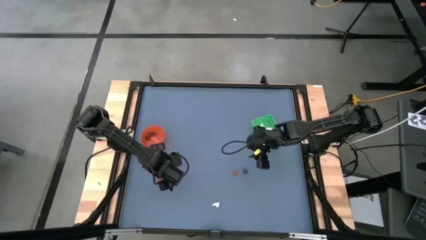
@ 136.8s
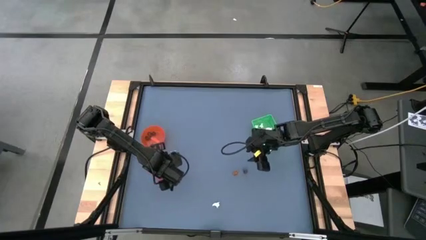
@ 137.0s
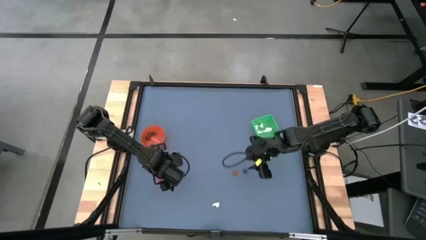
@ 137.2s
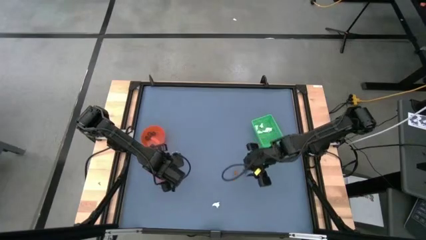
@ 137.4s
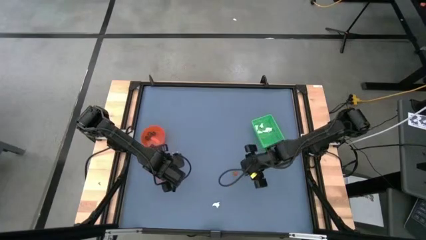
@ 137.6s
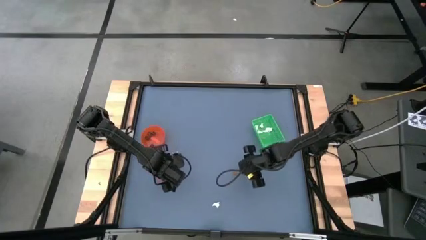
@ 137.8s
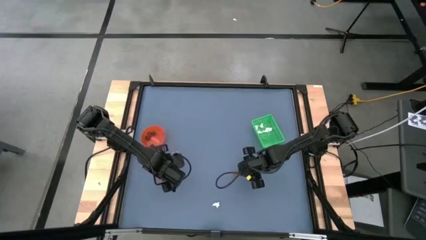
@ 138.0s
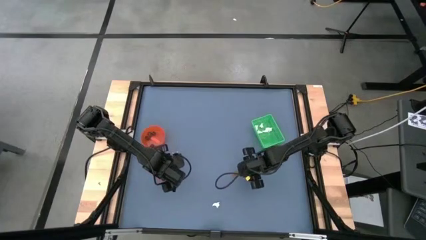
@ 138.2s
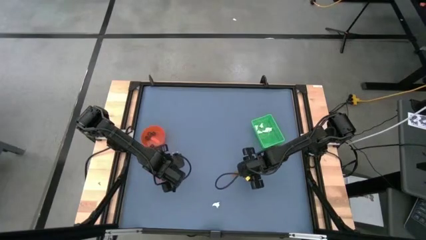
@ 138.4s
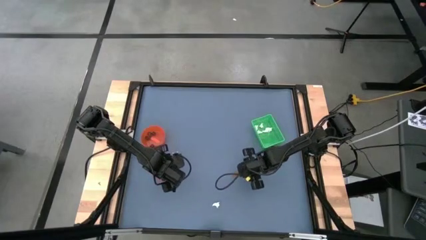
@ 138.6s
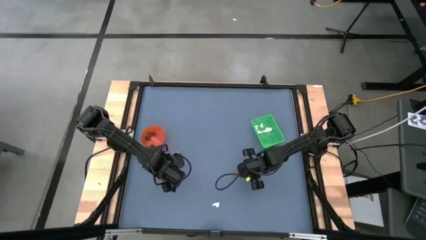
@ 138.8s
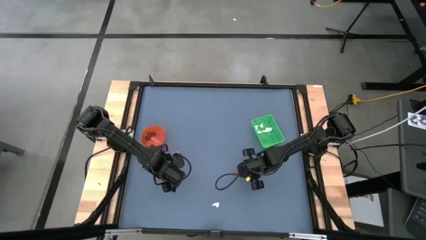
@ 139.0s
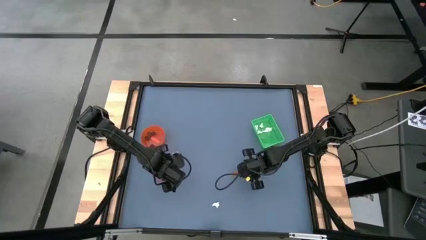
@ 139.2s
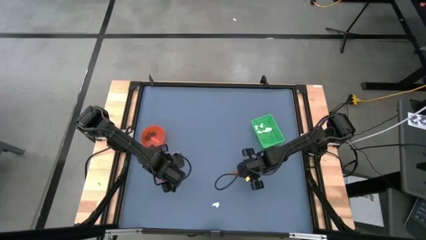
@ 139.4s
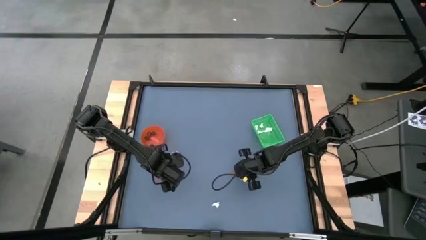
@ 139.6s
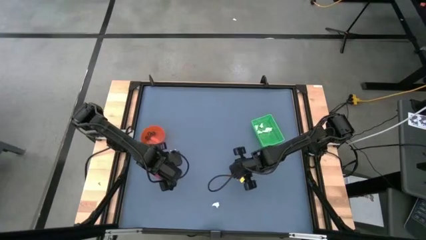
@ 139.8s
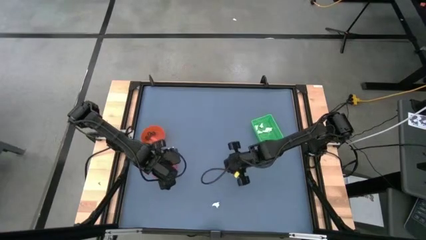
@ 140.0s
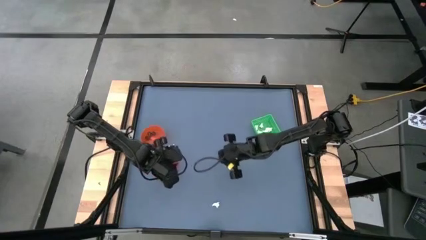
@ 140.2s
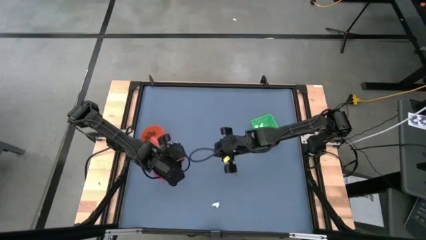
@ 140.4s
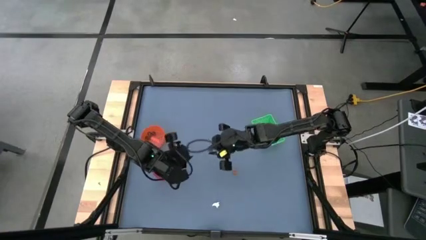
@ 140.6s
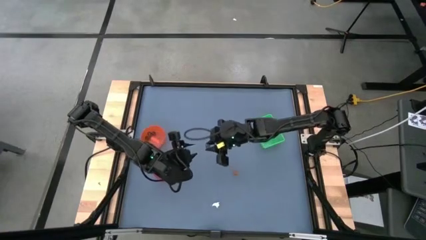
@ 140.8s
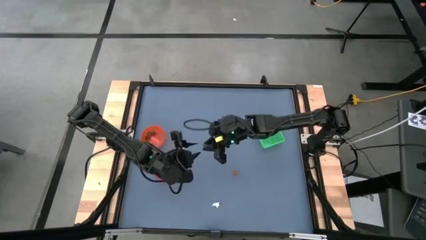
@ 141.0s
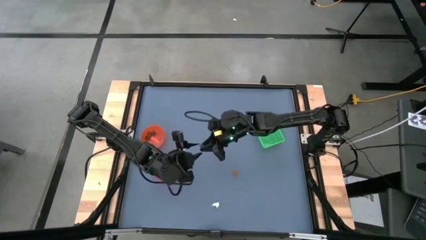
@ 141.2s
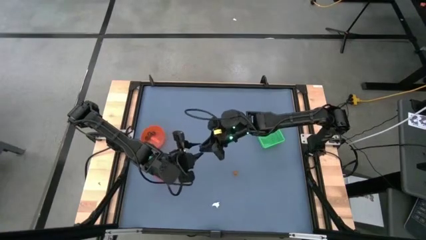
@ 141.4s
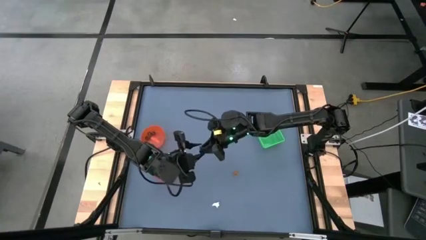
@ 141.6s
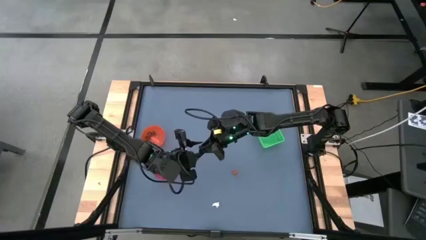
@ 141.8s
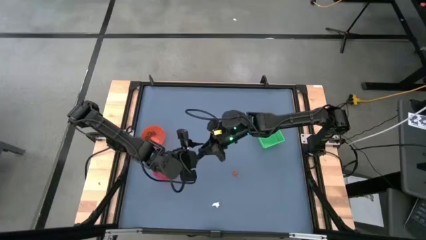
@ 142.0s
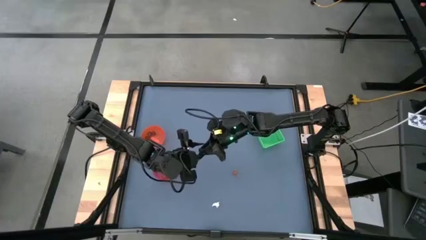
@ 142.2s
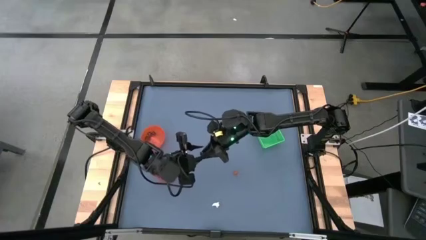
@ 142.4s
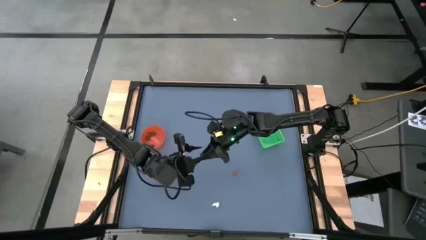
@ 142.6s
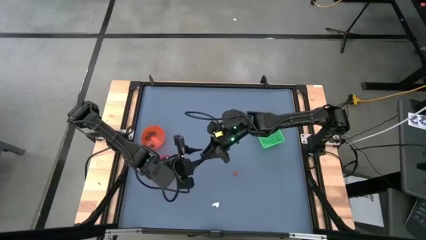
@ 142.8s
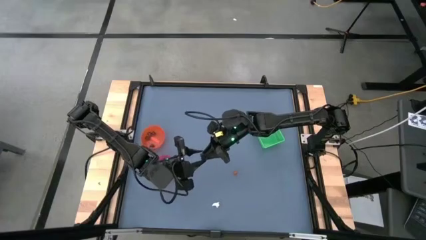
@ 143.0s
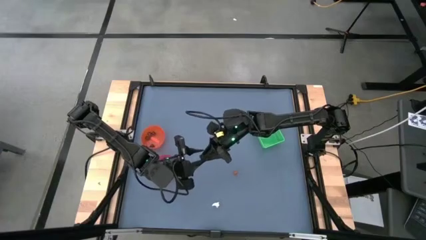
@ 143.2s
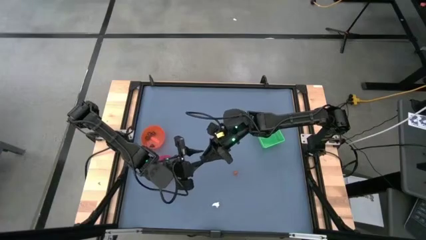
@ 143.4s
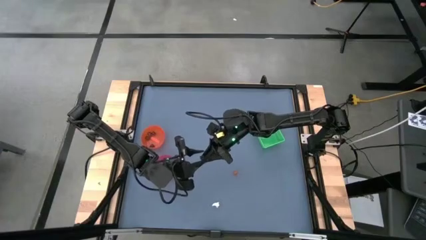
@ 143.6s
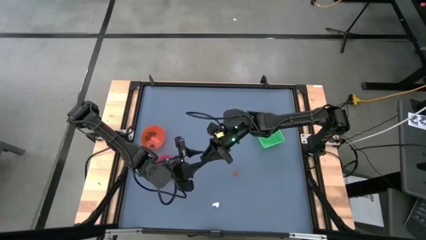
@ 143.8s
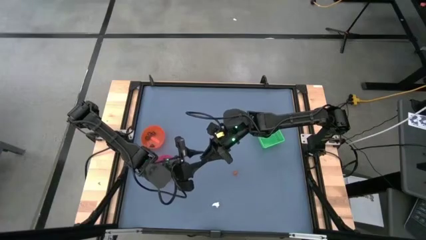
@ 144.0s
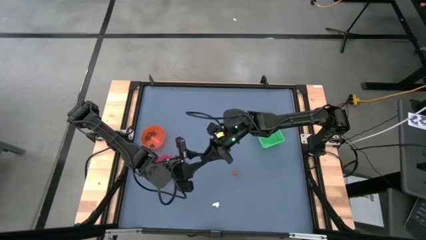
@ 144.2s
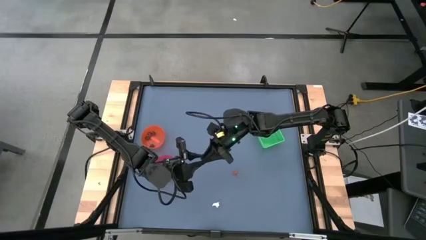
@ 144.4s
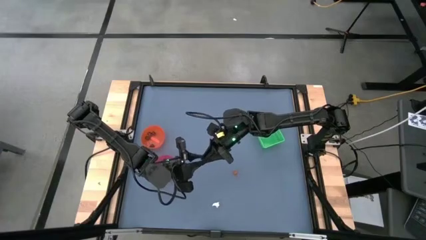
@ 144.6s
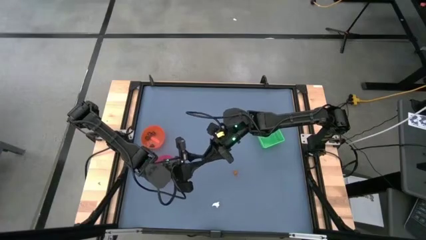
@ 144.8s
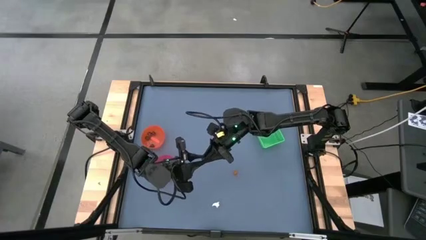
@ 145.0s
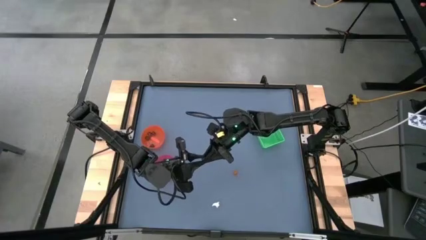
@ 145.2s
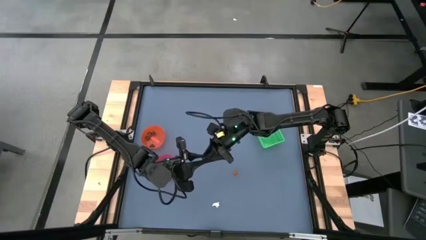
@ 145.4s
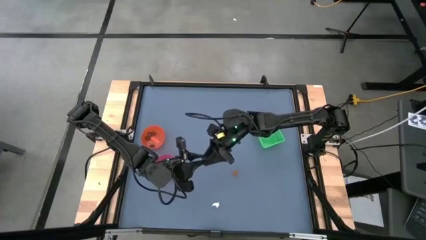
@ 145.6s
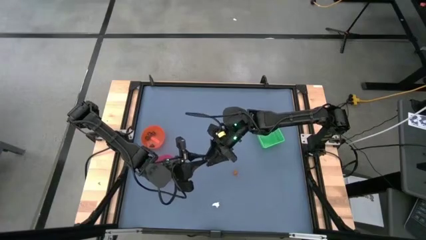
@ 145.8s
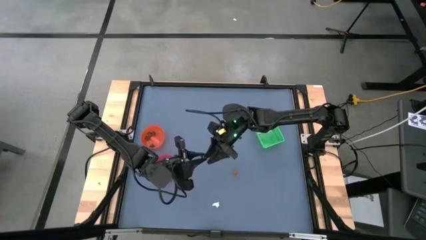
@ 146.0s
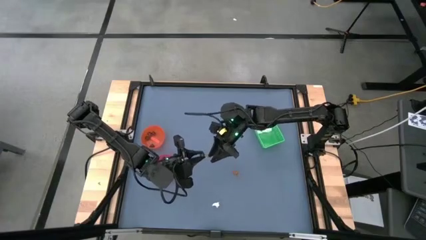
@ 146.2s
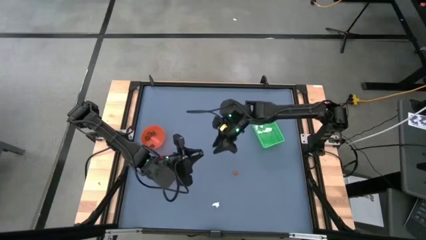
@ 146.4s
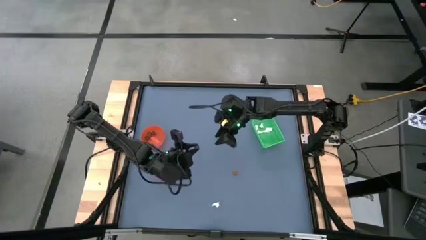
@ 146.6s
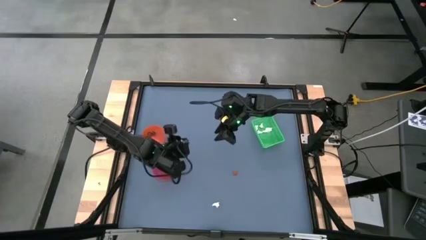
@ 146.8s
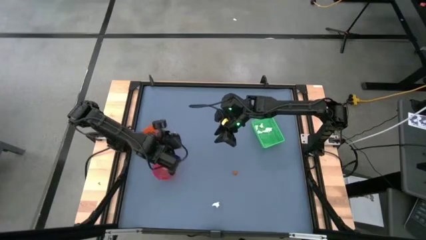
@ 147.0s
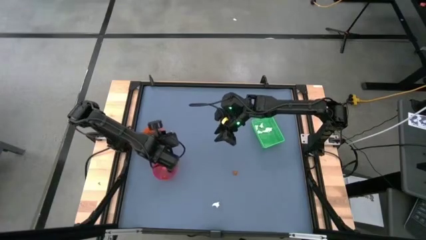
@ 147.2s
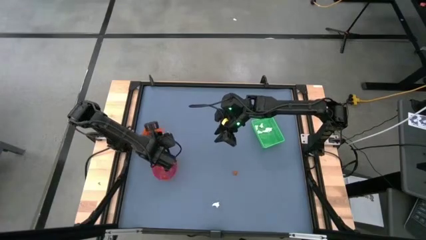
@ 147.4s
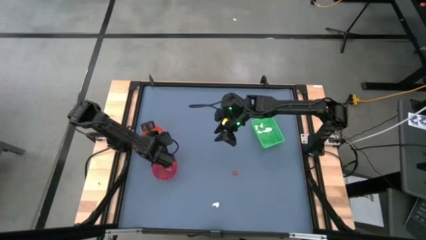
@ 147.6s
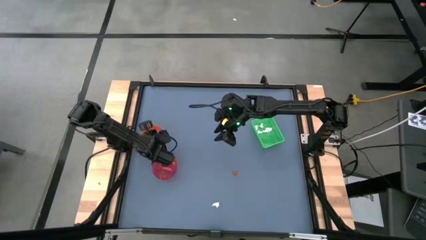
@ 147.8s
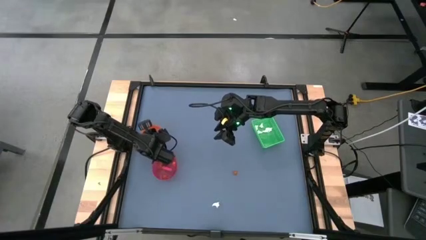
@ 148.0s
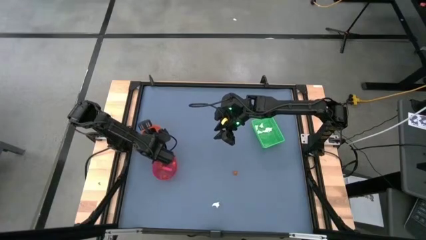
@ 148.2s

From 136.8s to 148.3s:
Task: Sort Halloween decoration
Put the black skull toy into the orange bowl

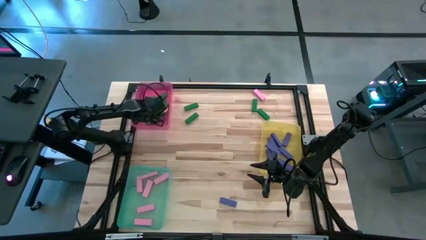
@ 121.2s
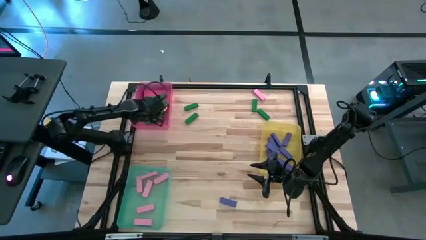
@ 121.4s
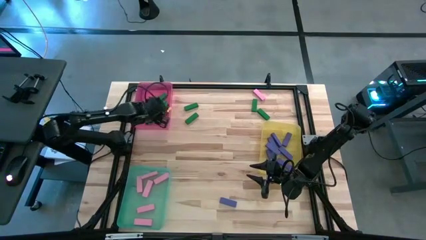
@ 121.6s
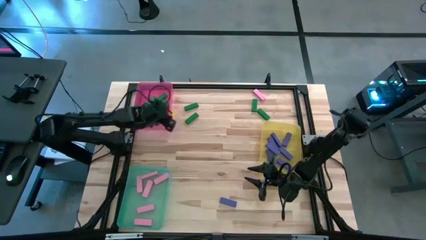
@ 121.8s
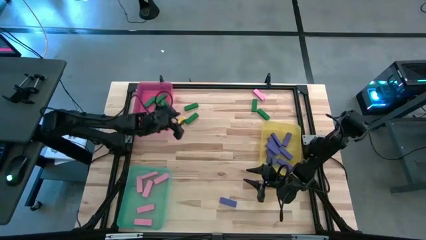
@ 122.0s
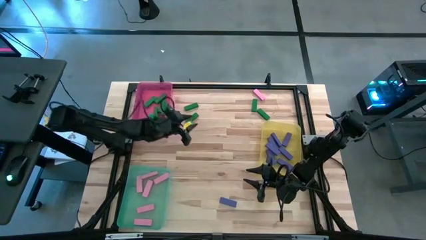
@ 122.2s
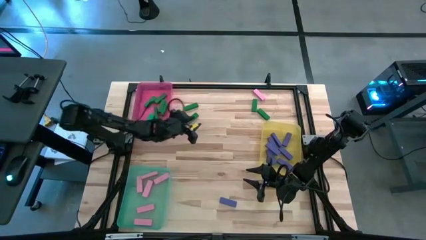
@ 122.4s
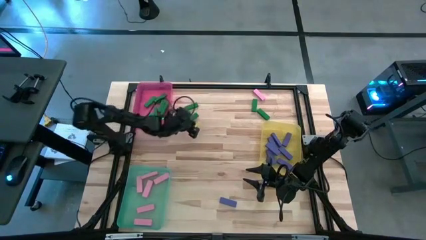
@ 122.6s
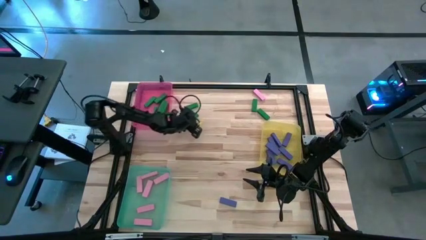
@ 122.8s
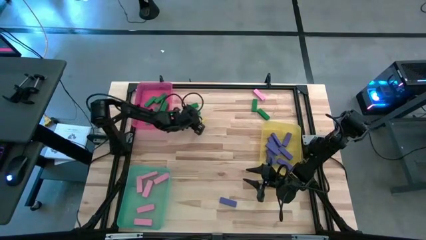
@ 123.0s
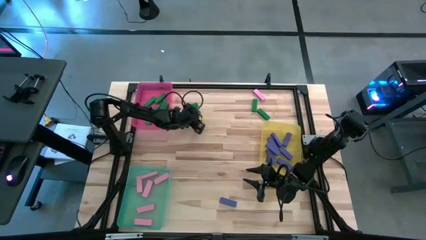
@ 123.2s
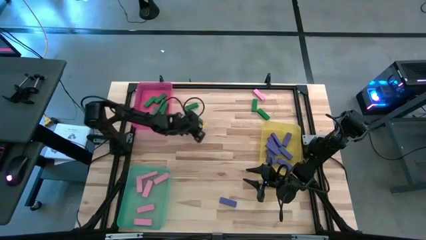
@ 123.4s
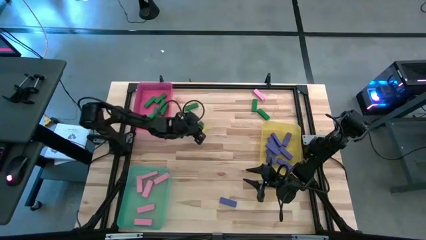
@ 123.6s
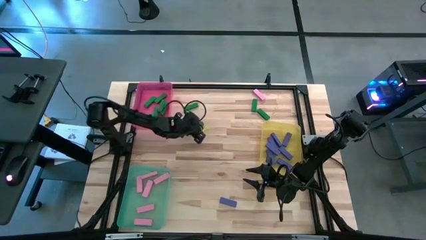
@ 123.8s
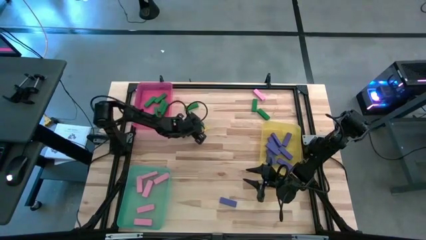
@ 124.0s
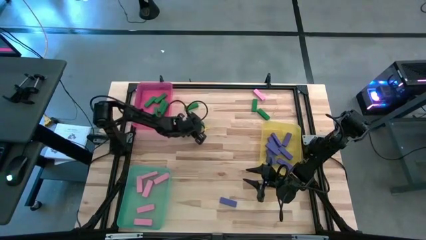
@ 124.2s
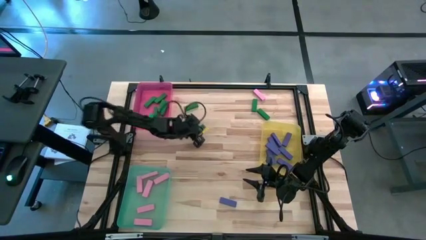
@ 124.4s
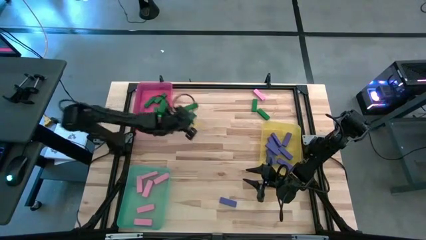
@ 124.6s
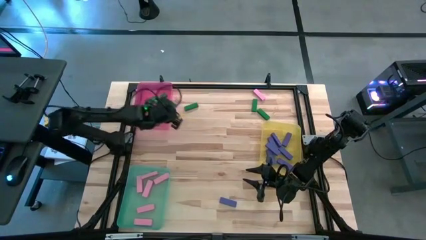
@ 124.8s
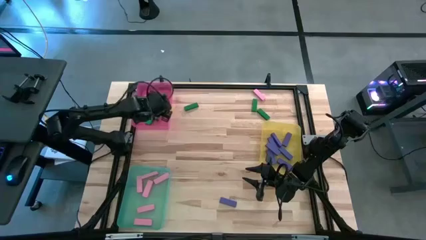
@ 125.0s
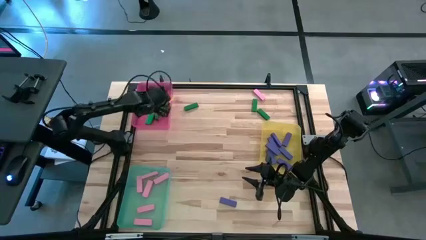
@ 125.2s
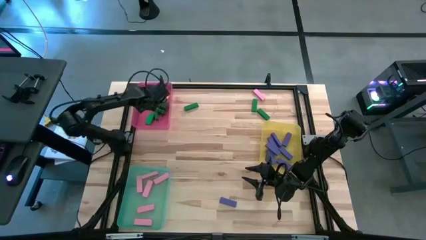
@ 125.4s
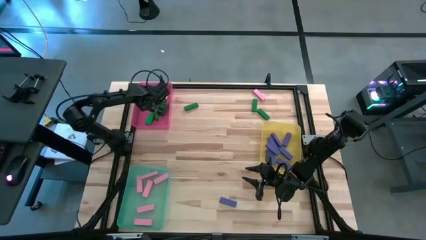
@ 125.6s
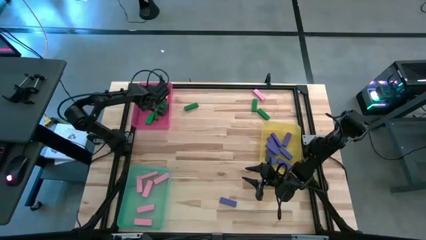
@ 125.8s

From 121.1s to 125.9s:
Task: Sort blocks
Put the green block into the pink bin
